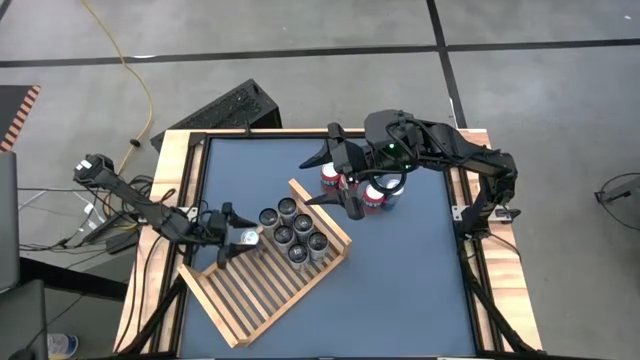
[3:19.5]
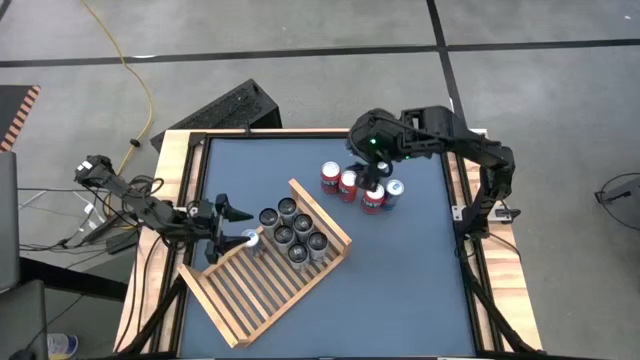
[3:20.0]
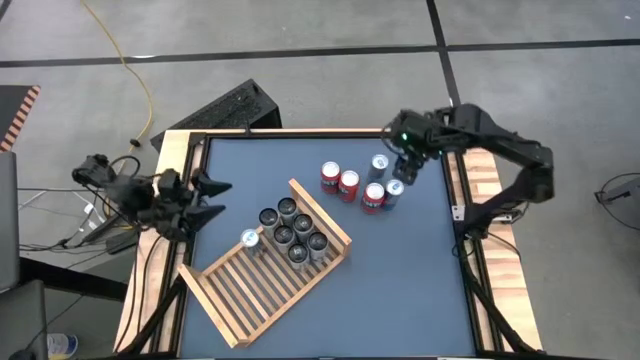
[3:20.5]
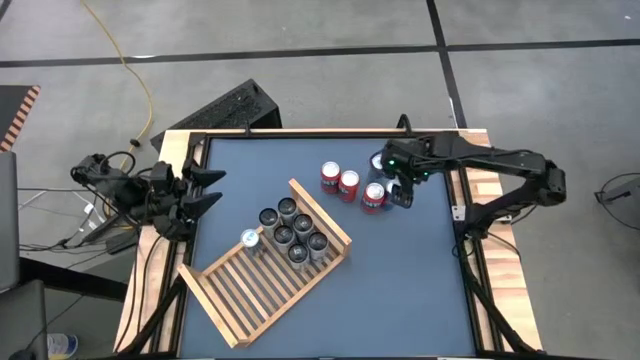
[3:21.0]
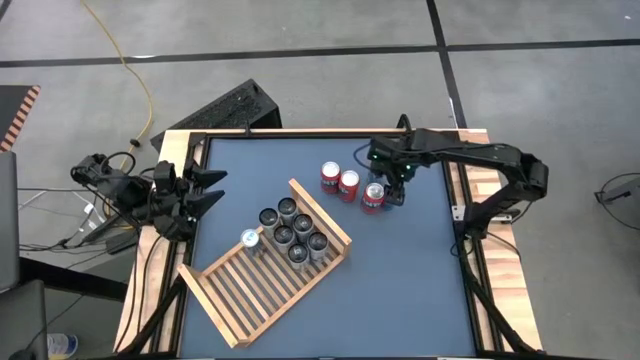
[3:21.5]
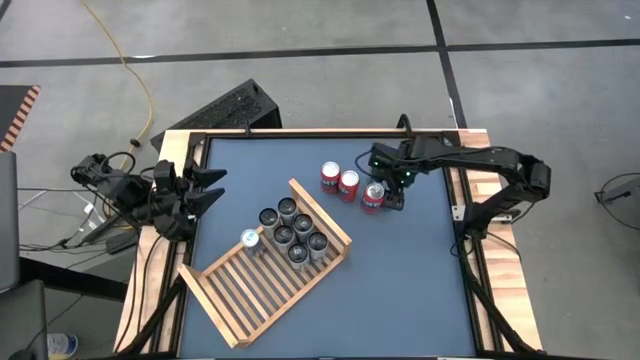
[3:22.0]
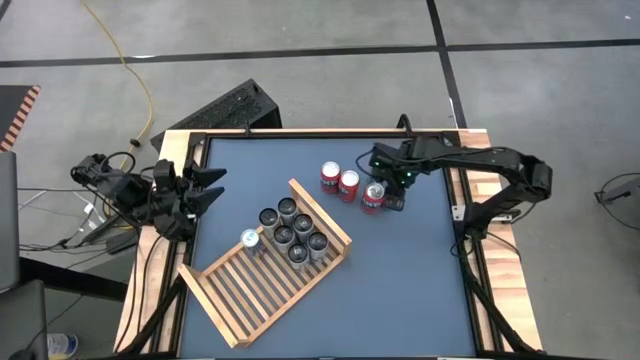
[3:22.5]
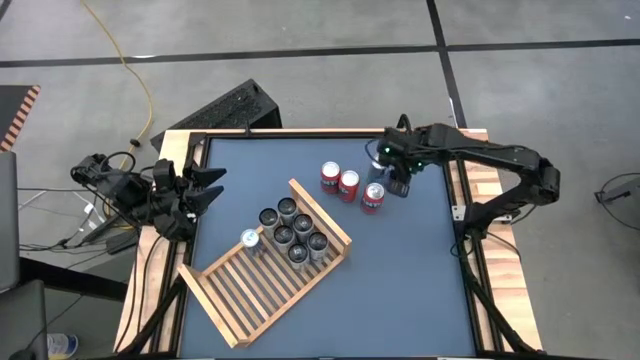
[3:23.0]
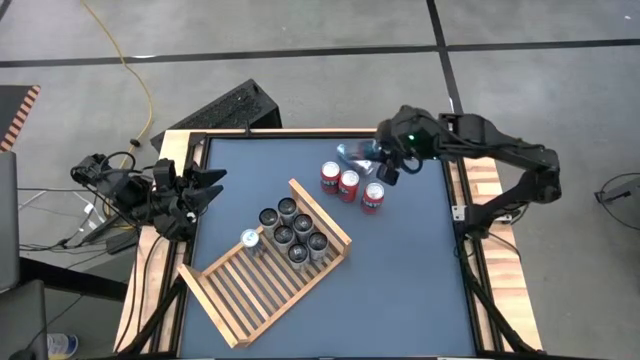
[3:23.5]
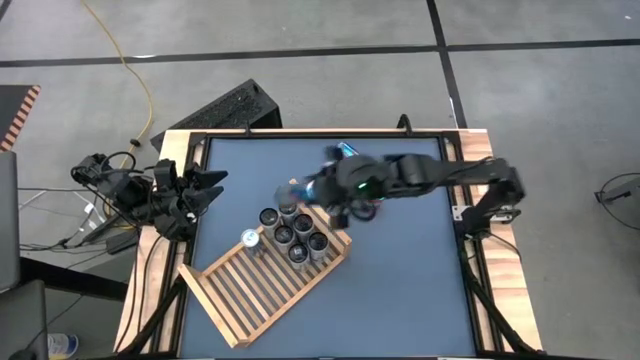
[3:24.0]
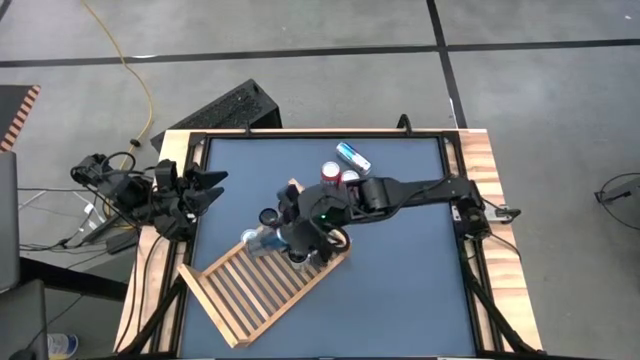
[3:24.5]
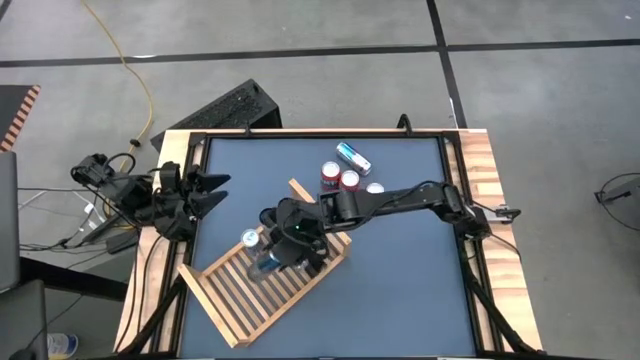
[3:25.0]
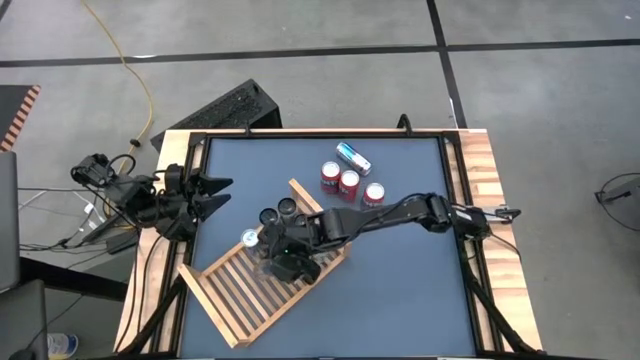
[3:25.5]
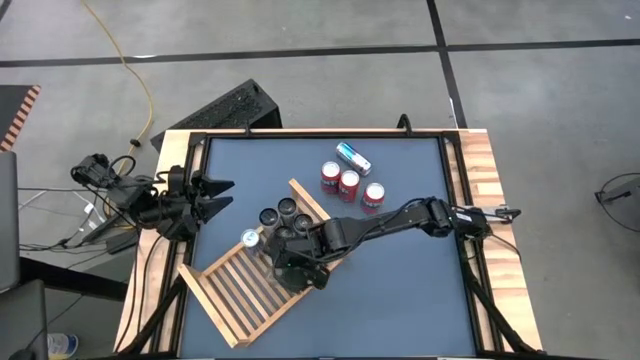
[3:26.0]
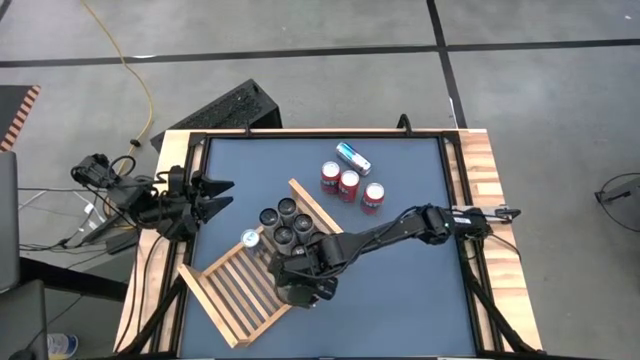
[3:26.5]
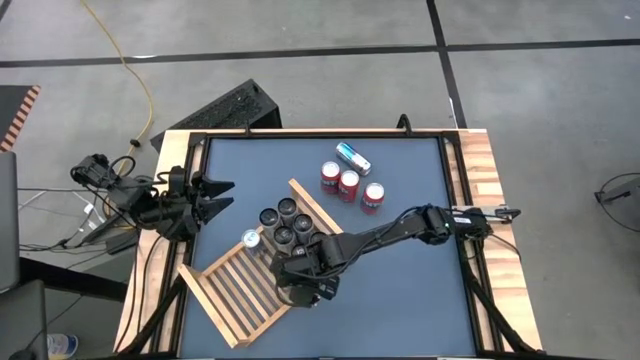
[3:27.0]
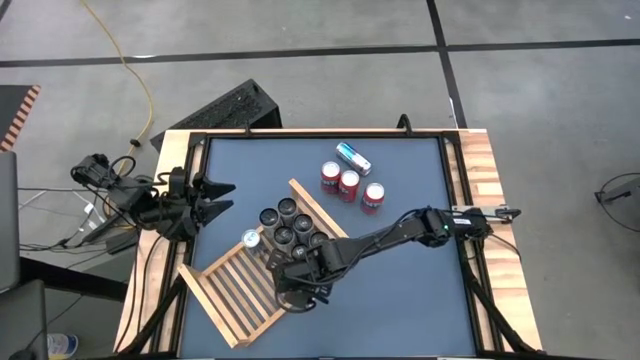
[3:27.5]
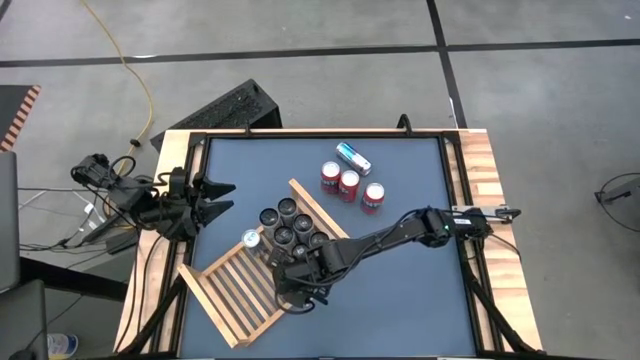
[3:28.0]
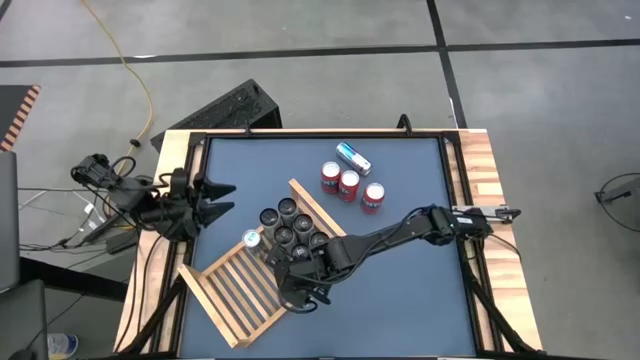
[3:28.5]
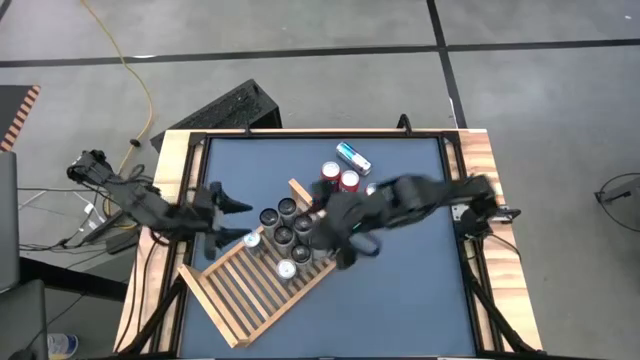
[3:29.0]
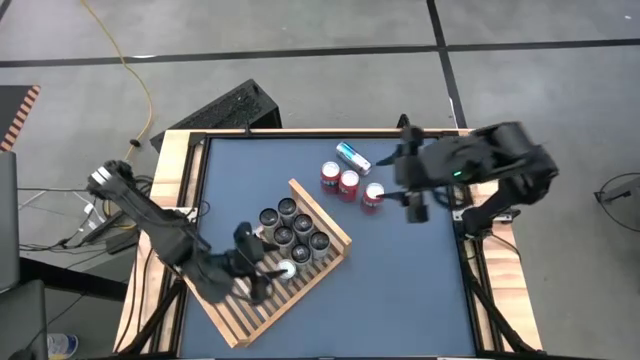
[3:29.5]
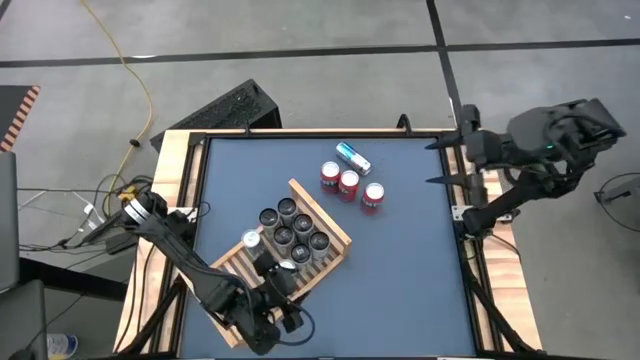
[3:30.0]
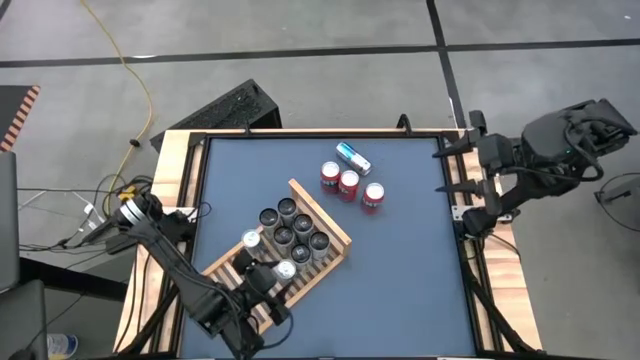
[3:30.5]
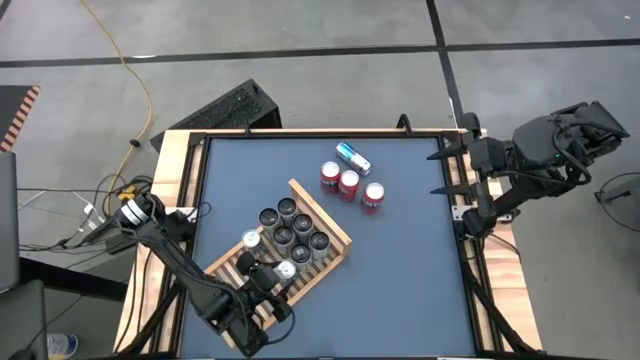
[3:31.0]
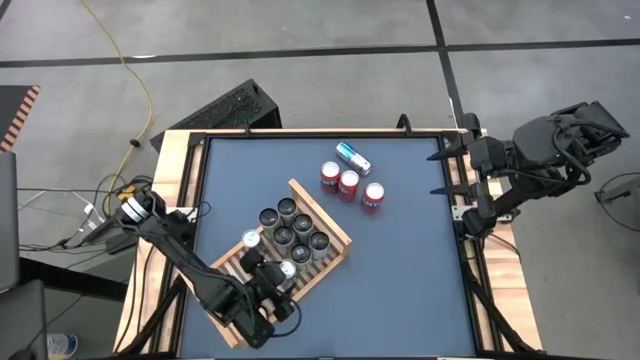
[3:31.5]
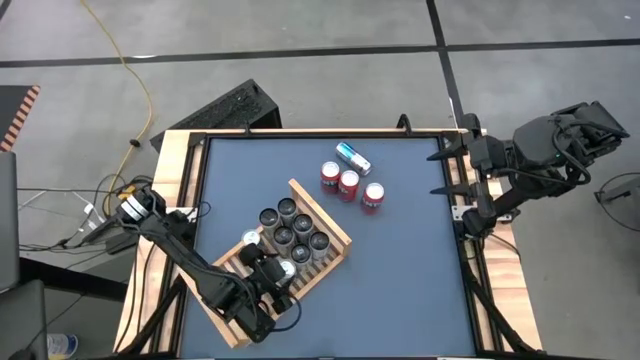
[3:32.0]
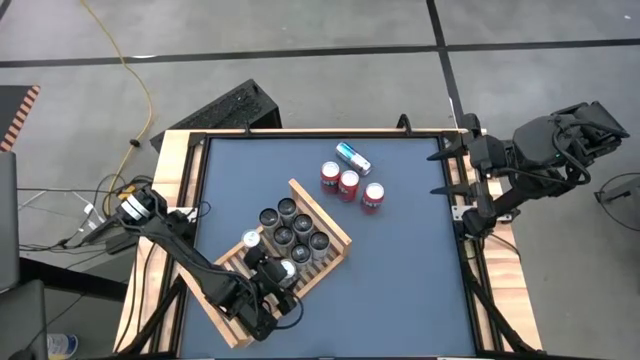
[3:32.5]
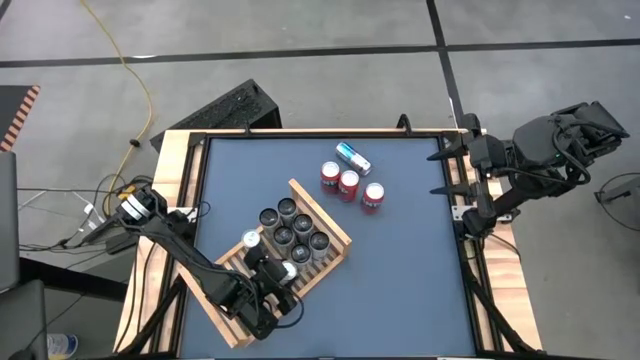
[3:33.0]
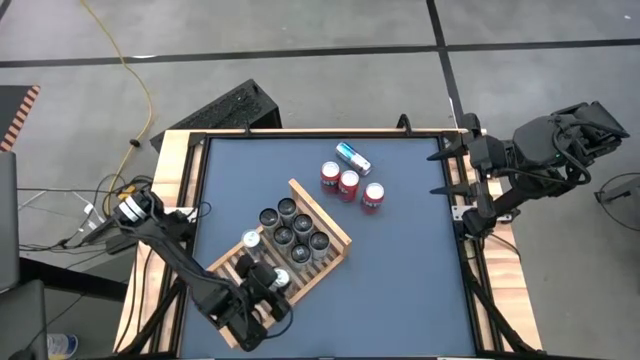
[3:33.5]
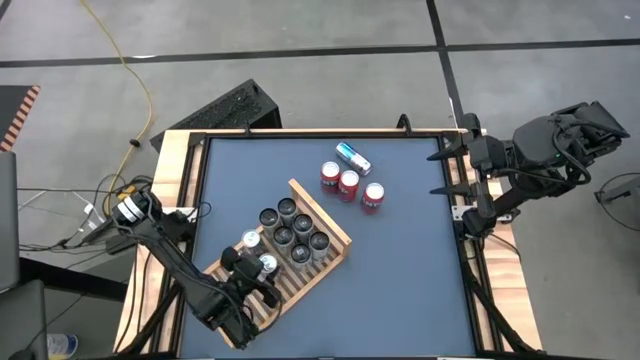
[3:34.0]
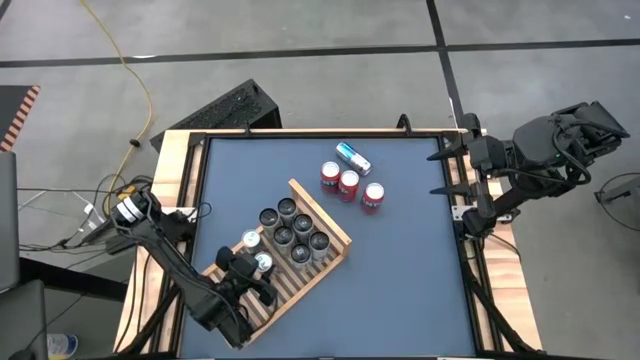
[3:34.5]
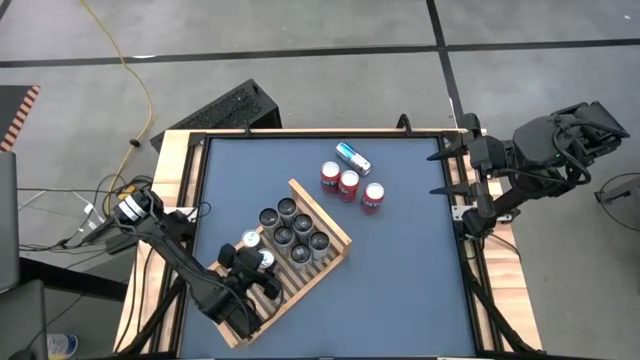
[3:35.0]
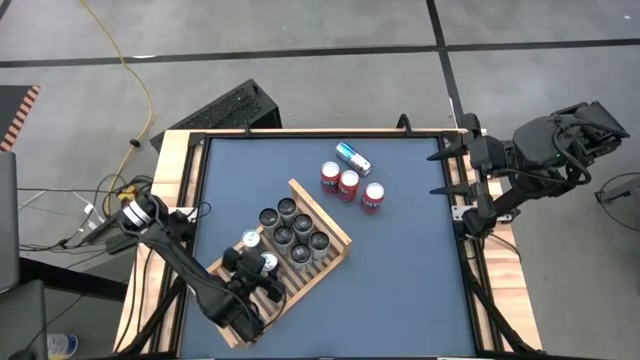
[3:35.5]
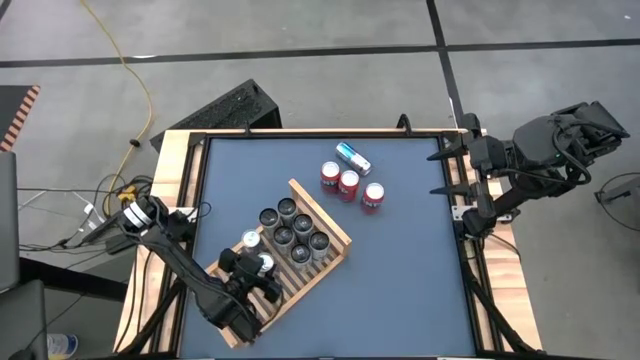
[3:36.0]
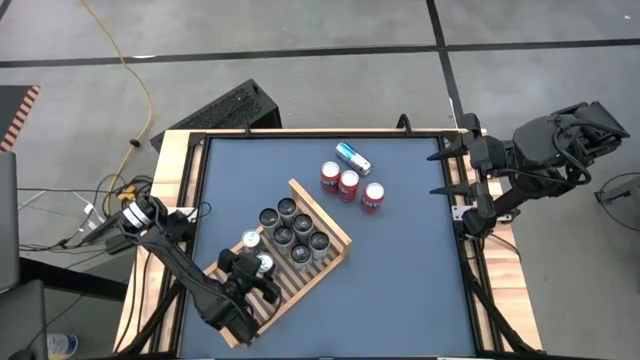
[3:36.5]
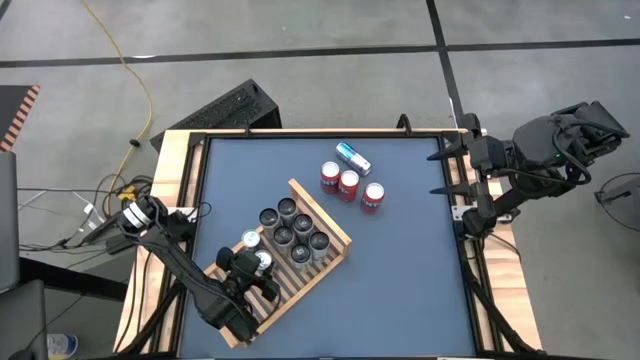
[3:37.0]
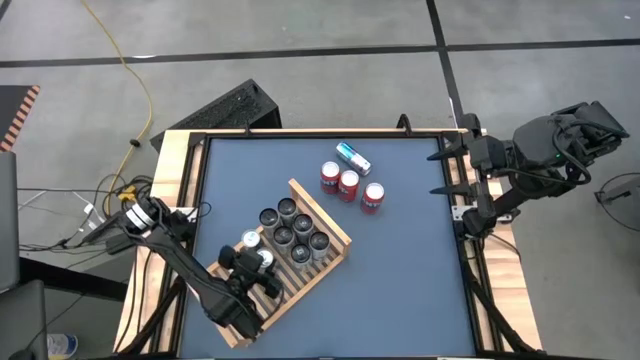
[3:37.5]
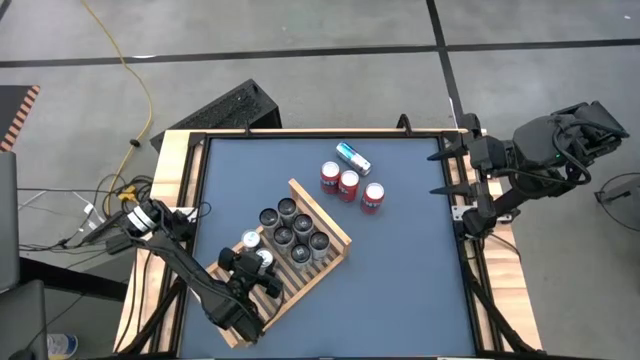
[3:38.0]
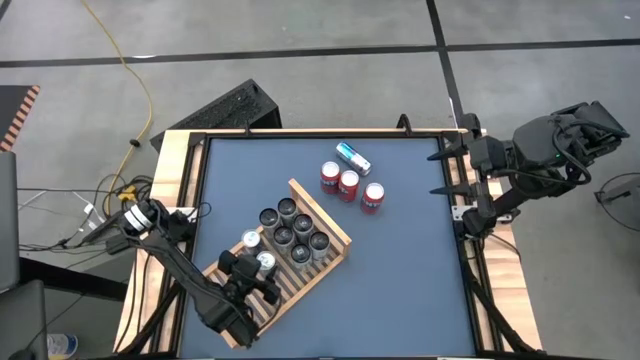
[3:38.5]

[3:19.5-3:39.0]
Task: Place canned beverage on shelf
Put the bottom blue soda can on the shelf aligned with the other blue soda can

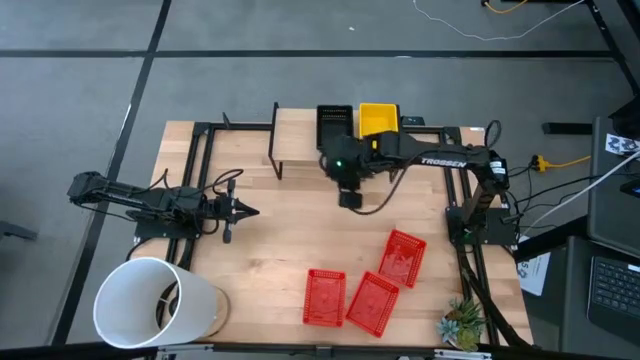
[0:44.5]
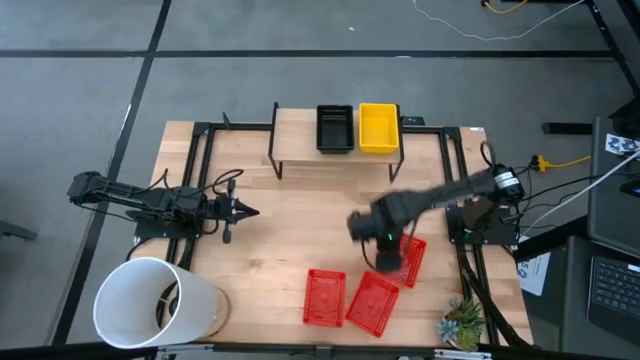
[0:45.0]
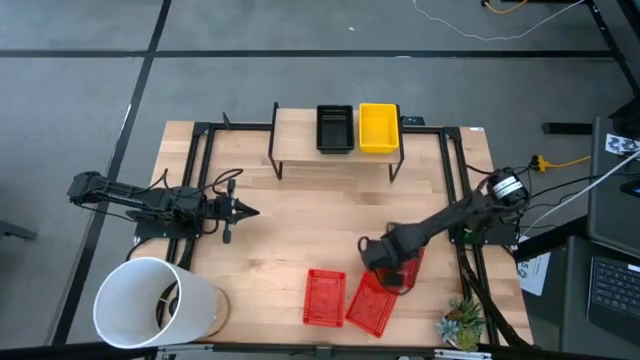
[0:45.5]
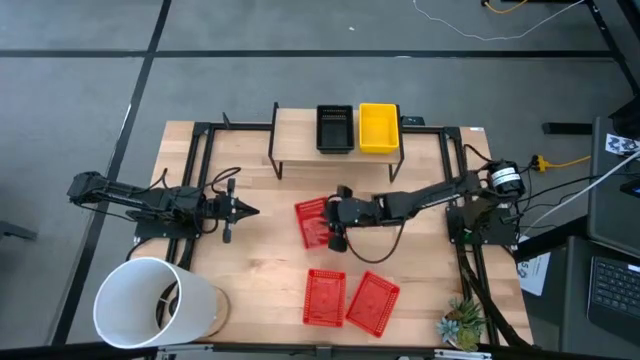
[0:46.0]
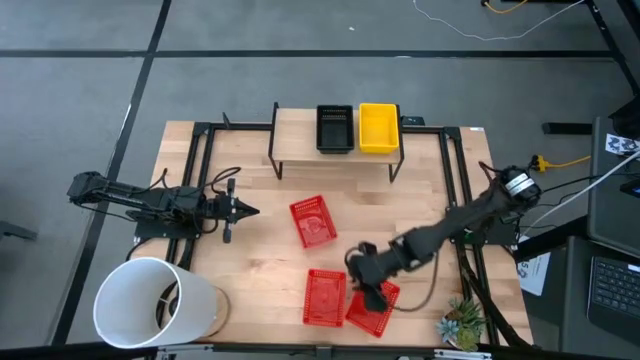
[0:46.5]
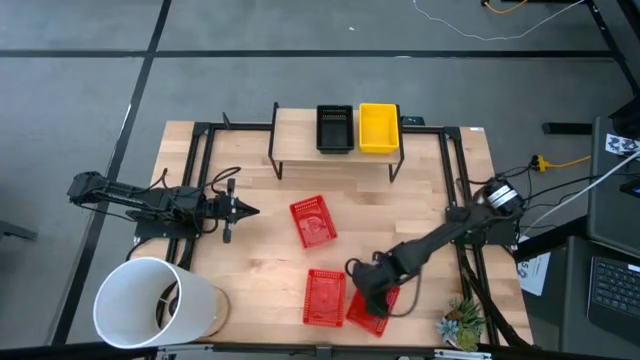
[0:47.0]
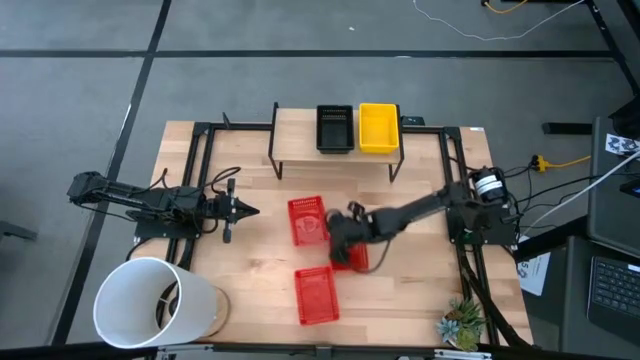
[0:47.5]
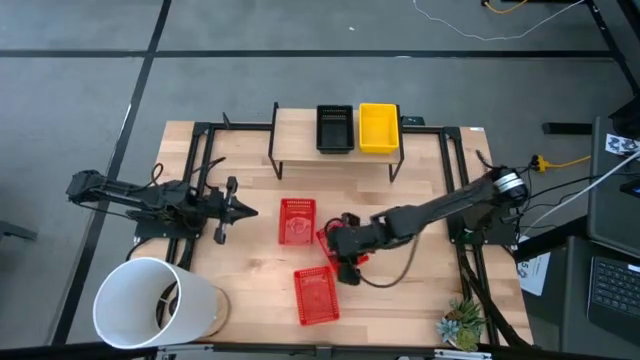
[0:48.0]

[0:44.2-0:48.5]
Task: Stack baskets on shelf by color
Adjust the red baskets
